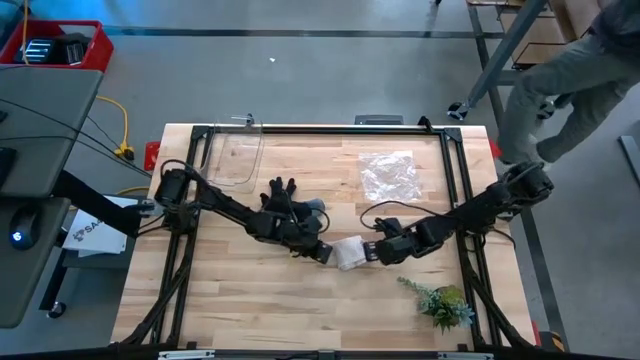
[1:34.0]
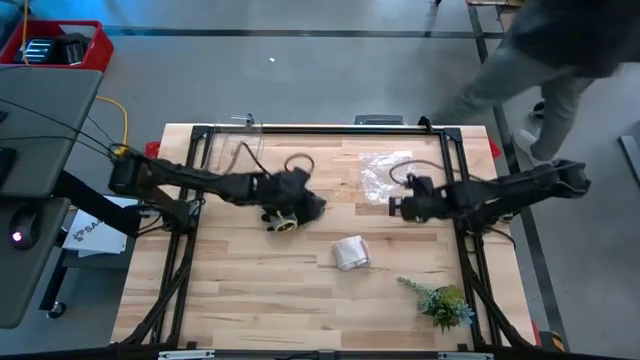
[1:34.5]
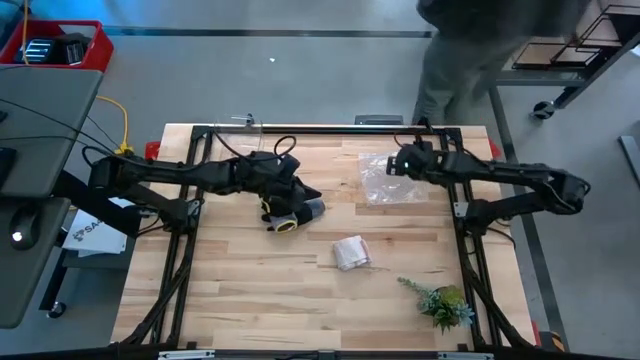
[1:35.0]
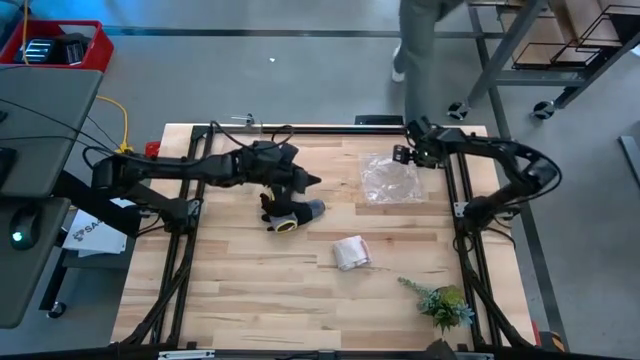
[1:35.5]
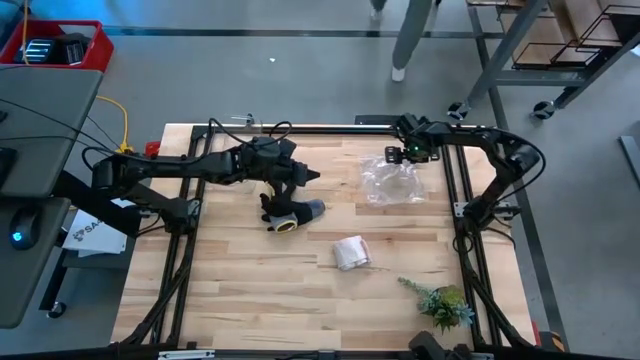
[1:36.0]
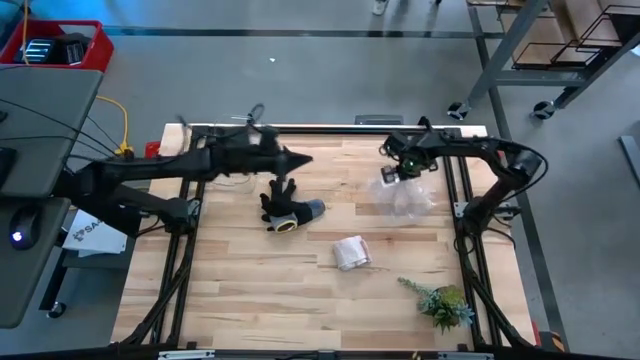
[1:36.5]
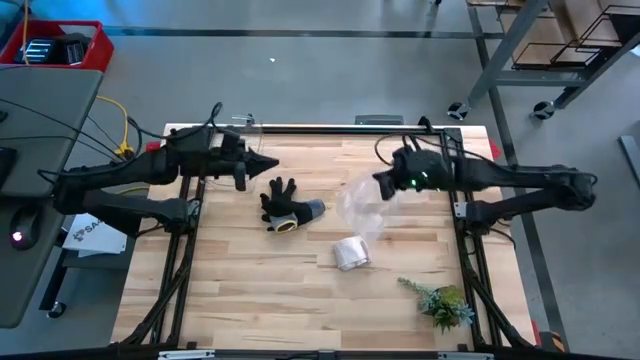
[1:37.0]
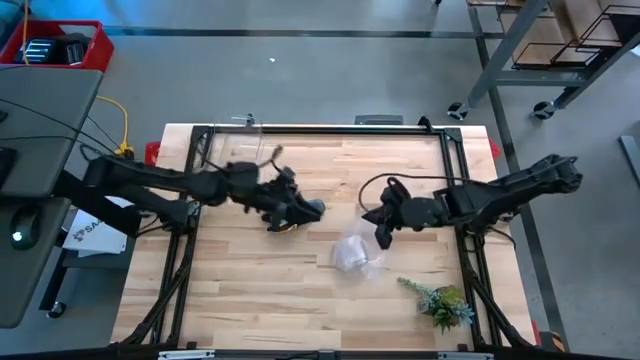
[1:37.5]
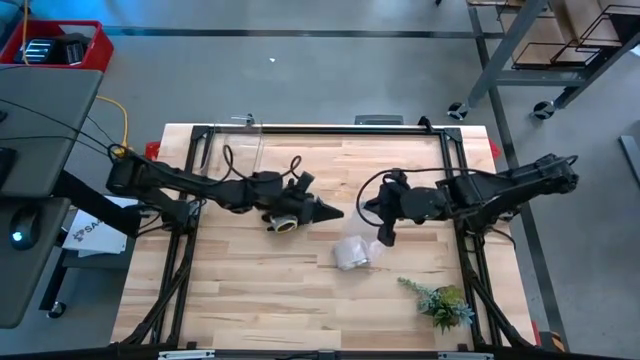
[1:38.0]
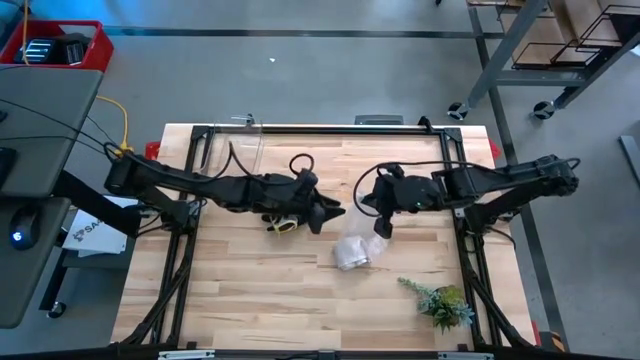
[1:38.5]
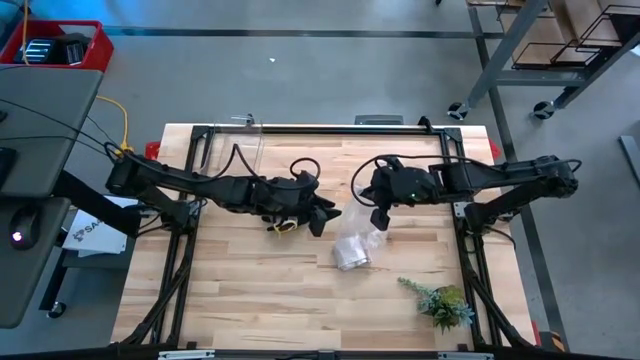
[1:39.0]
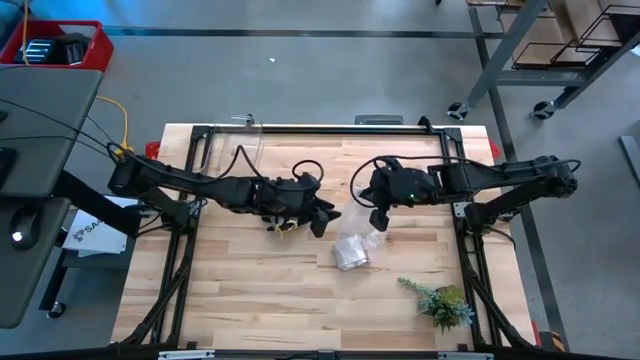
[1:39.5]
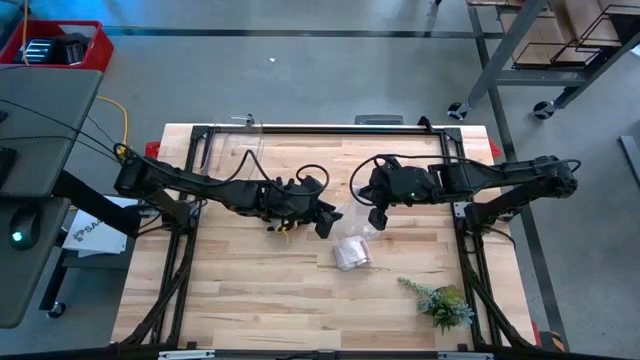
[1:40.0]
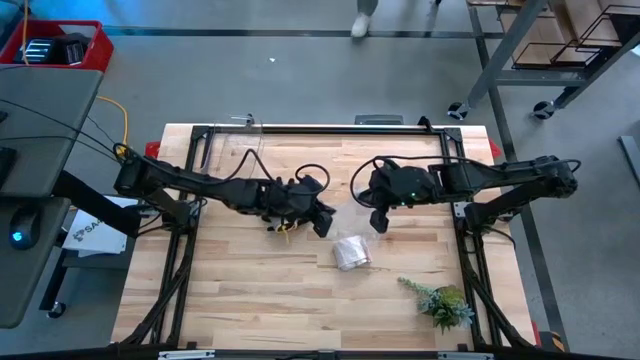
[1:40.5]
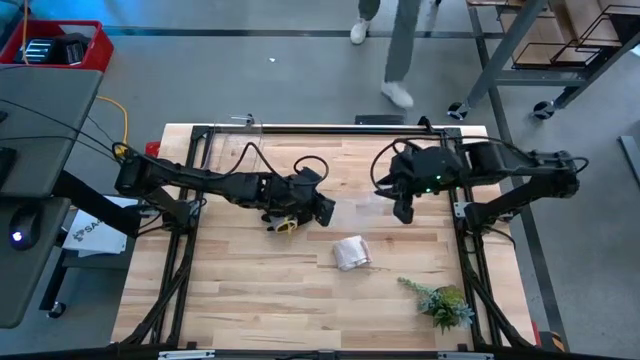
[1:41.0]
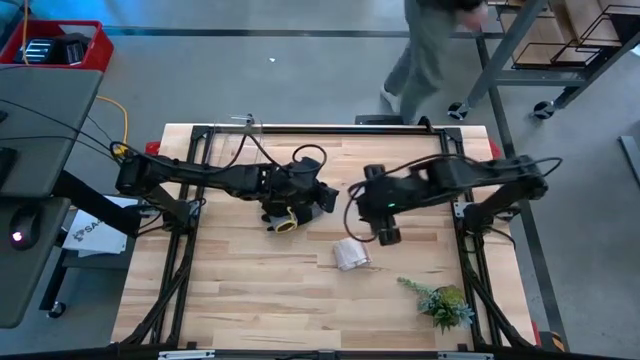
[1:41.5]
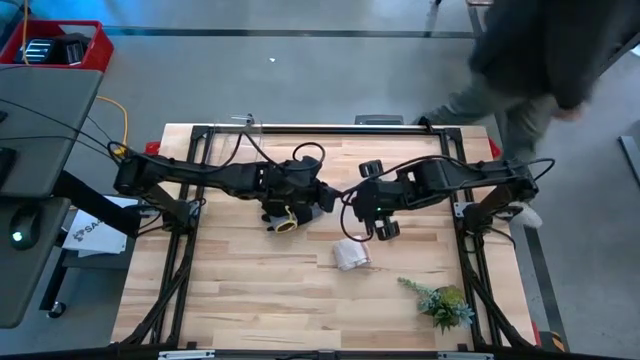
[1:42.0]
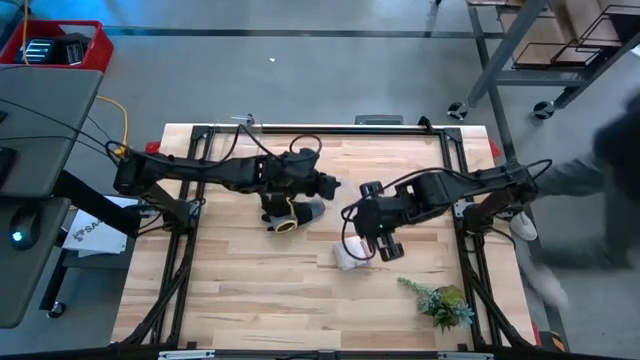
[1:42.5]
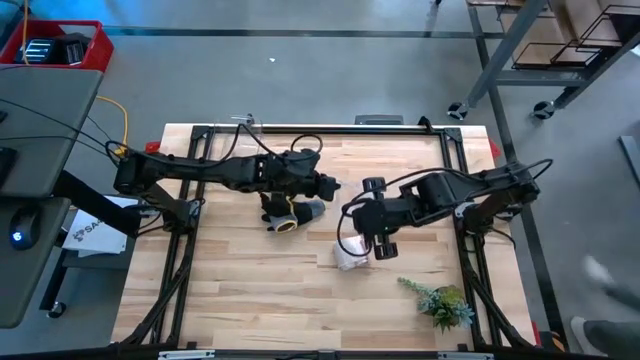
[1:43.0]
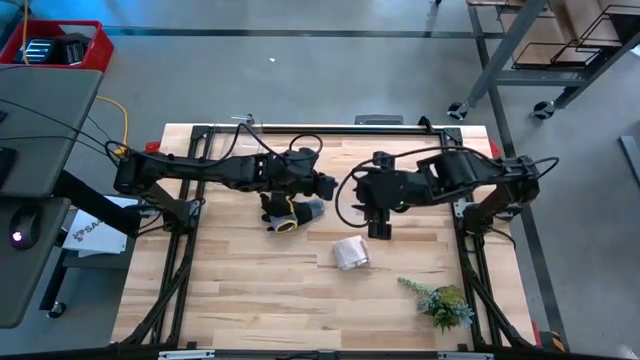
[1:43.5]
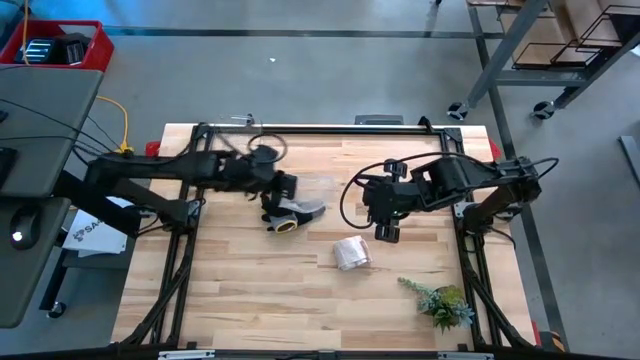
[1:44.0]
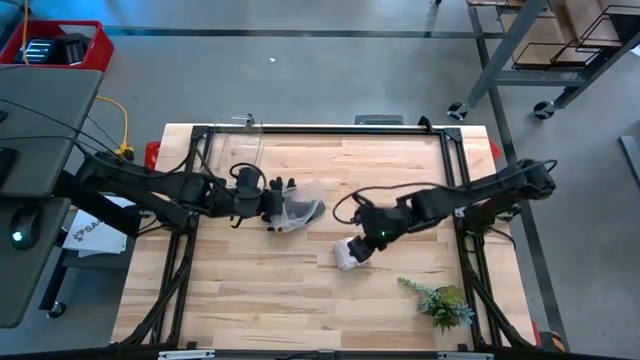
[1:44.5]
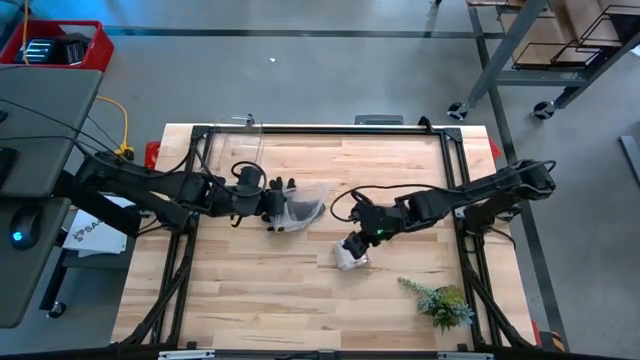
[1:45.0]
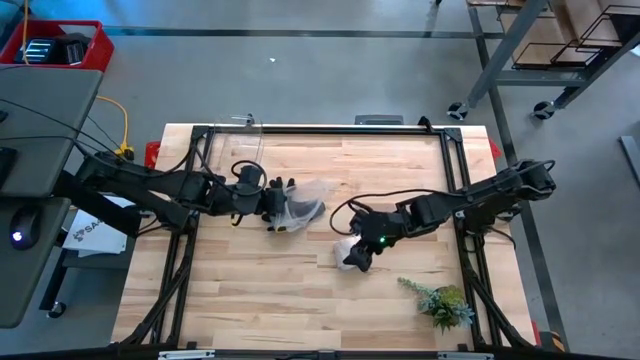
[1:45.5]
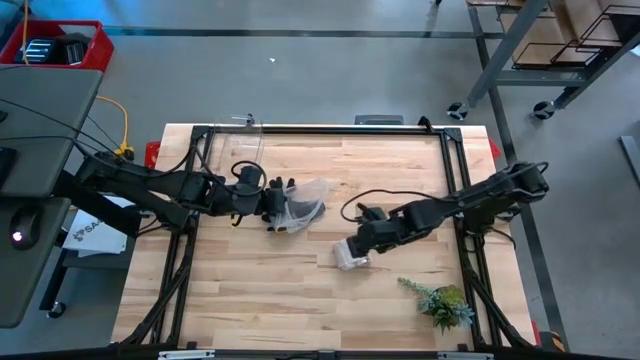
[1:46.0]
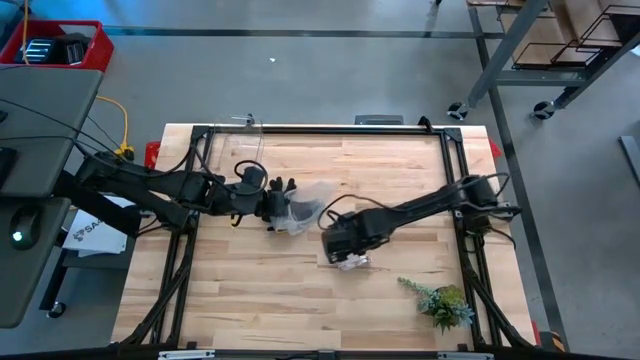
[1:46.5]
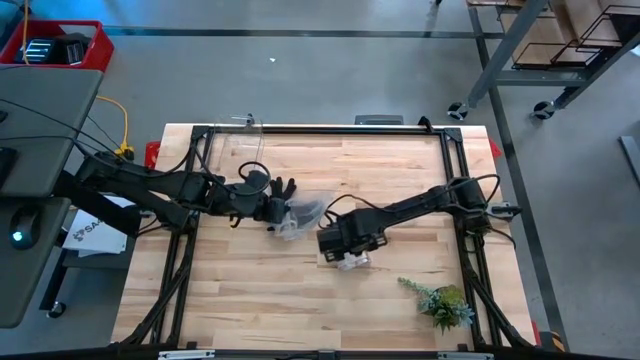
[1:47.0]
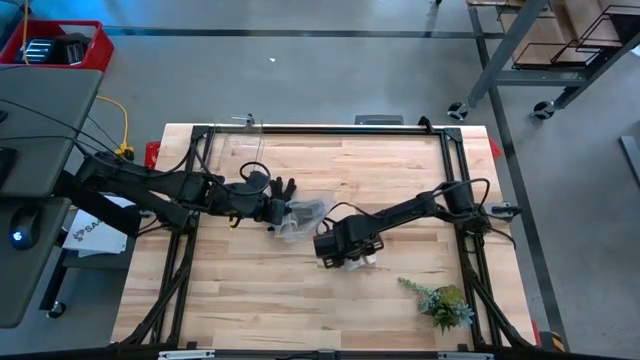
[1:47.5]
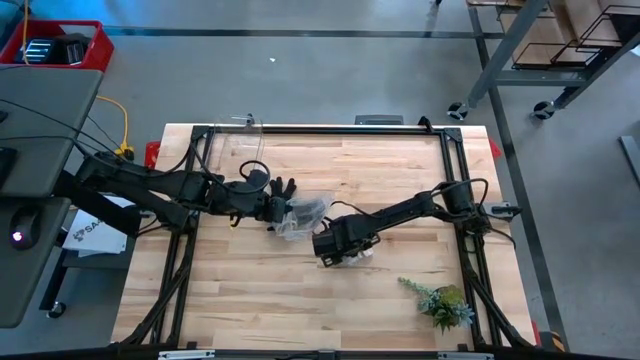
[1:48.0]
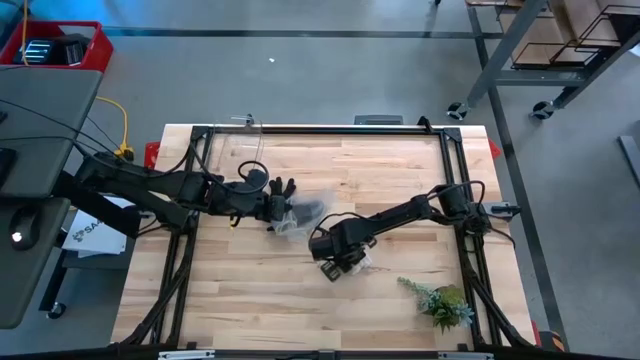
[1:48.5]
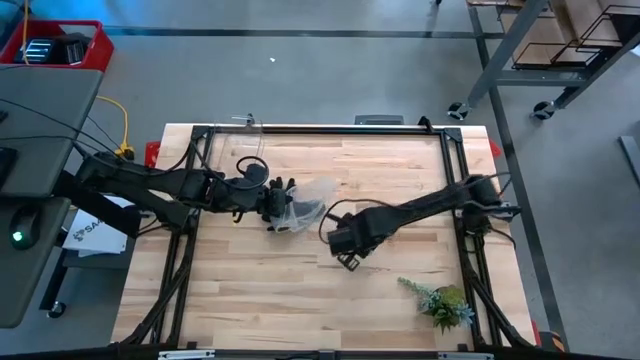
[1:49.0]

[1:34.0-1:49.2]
Task: Roll bandage
Put the white-brown bandage into the transparent zip bag

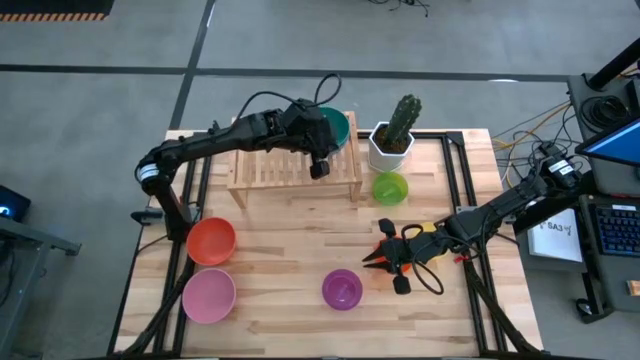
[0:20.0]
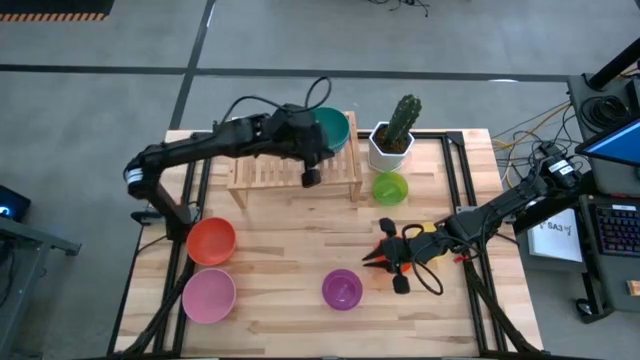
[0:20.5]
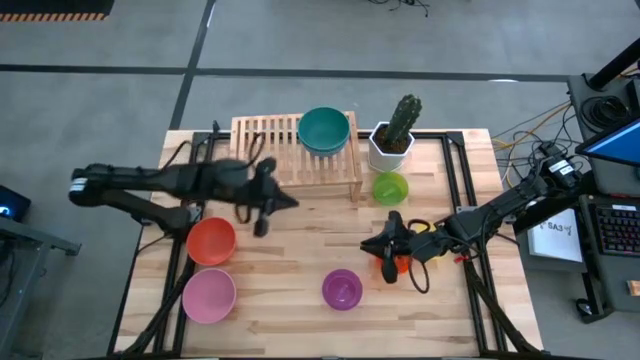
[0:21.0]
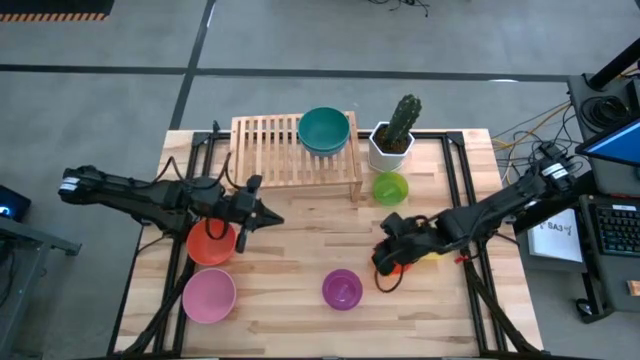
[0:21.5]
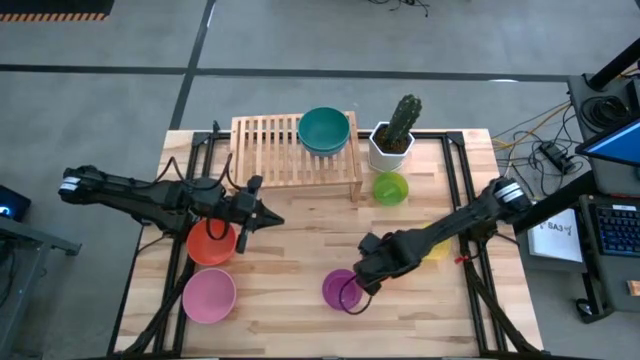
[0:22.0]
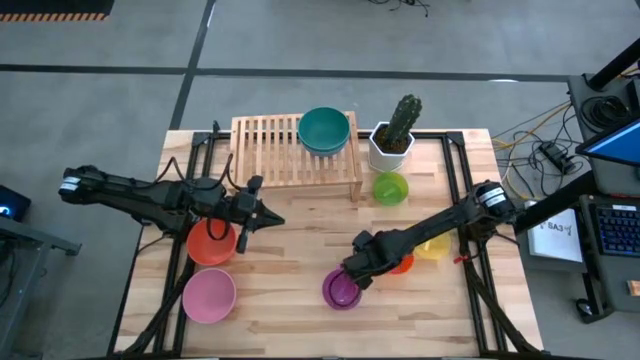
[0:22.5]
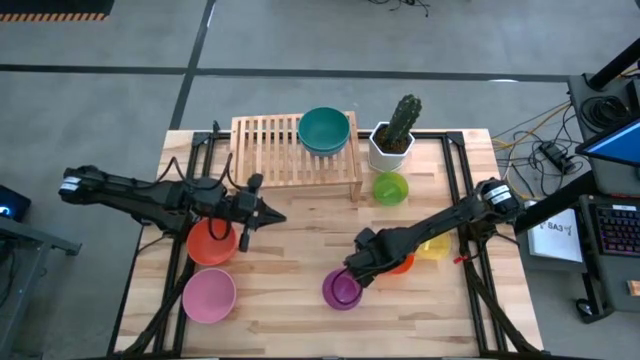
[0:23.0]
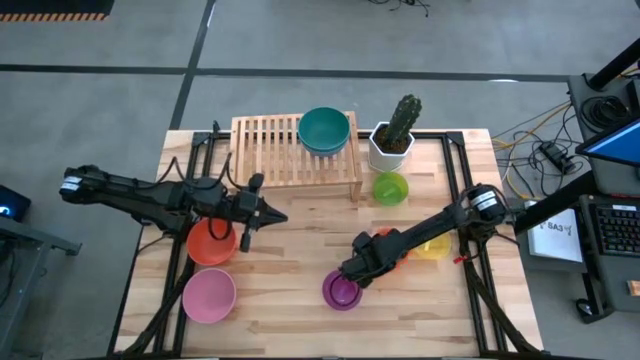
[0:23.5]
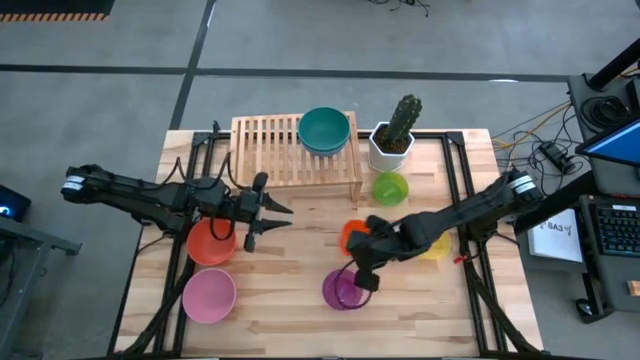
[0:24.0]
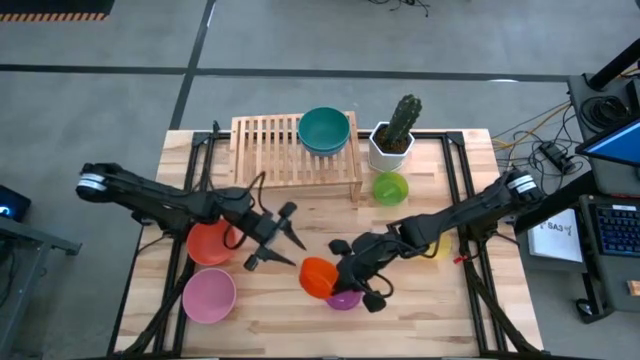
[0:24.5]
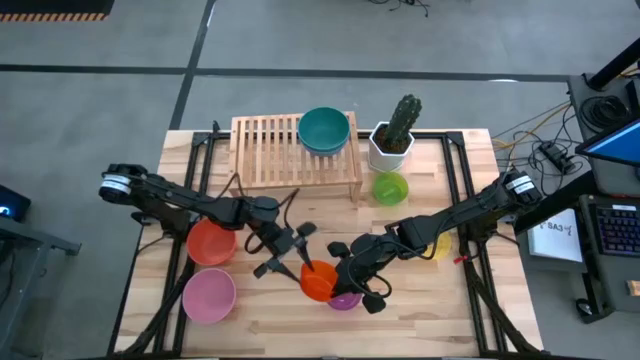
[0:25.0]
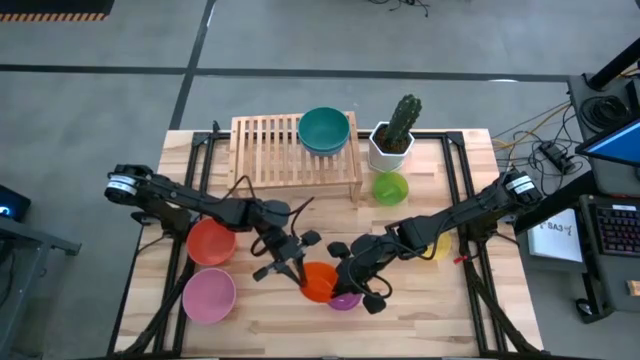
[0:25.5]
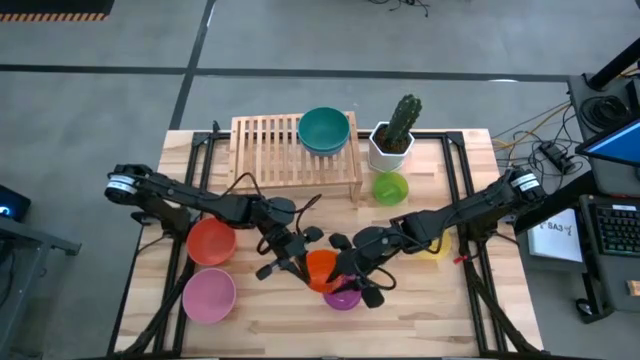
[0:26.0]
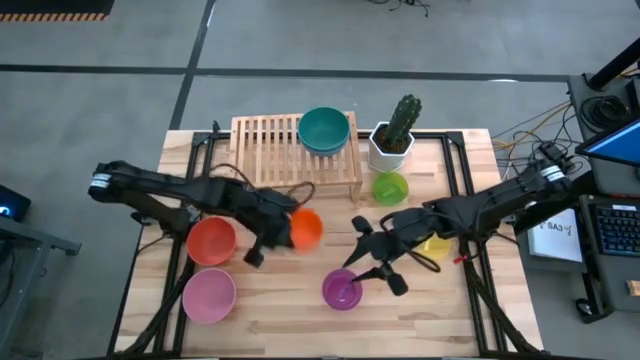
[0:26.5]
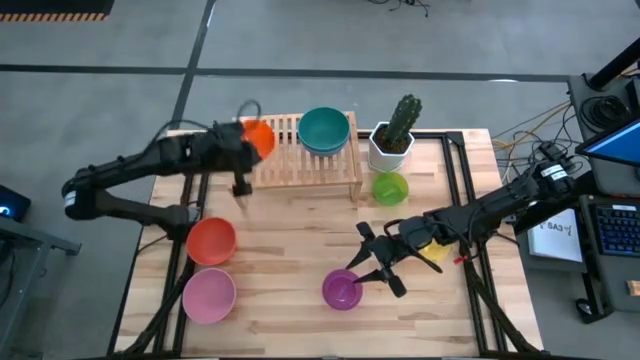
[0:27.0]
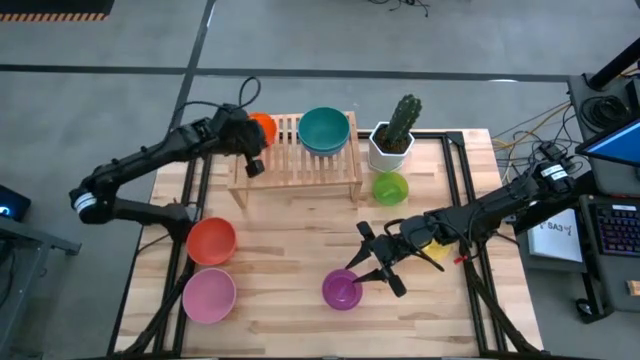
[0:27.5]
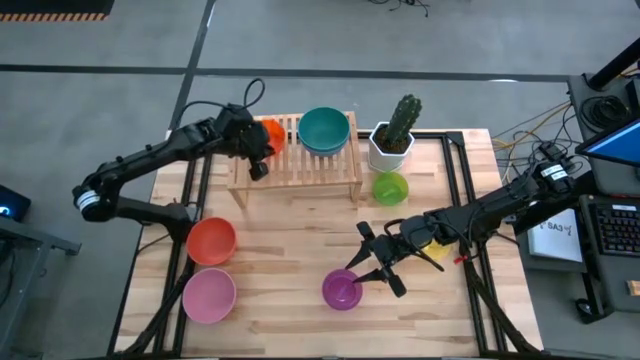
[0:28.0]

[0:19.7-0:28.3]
Task: Place and stack bowls onto a shelf
Put the right orange bowl on the shelf
